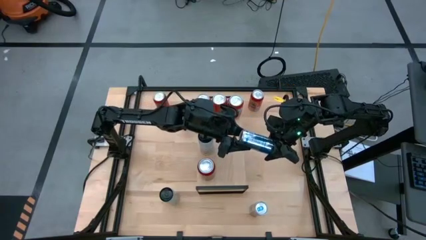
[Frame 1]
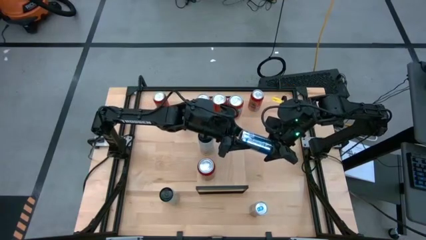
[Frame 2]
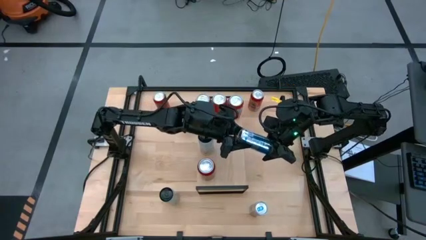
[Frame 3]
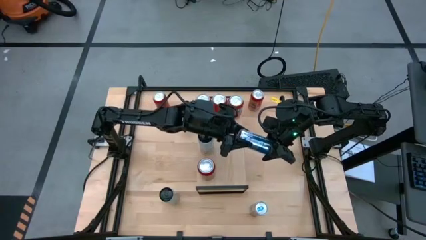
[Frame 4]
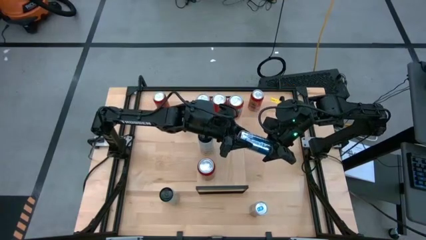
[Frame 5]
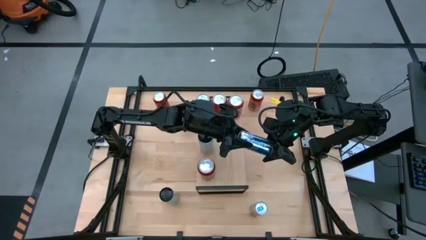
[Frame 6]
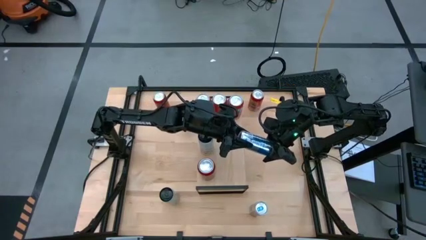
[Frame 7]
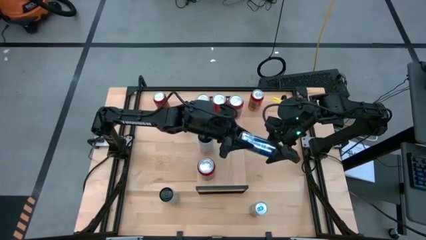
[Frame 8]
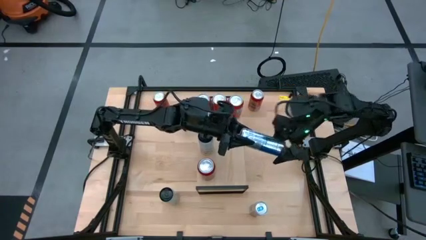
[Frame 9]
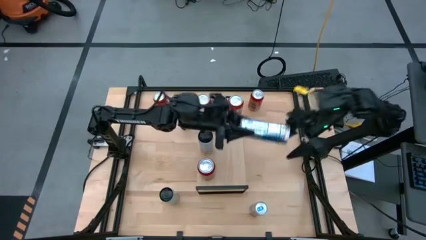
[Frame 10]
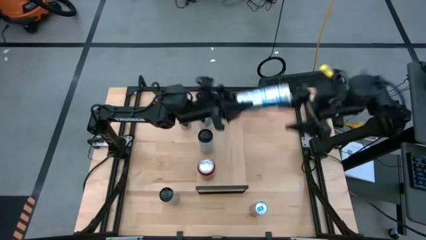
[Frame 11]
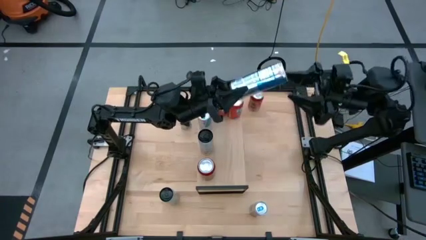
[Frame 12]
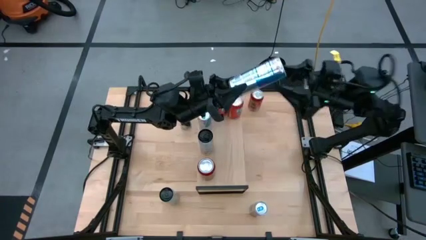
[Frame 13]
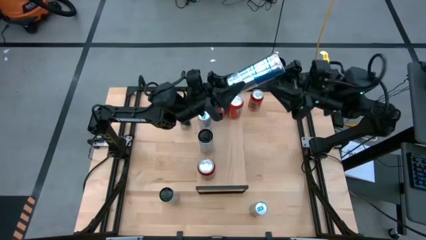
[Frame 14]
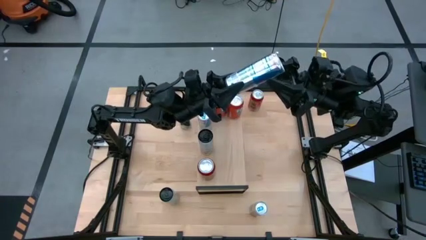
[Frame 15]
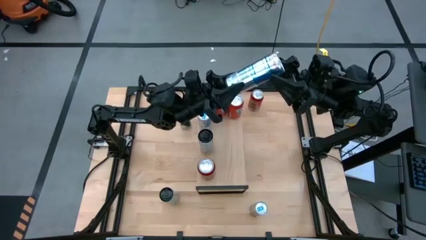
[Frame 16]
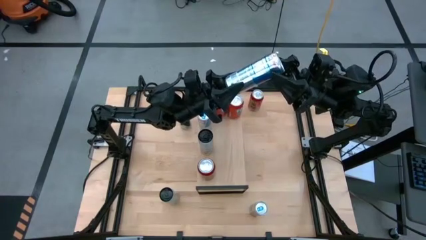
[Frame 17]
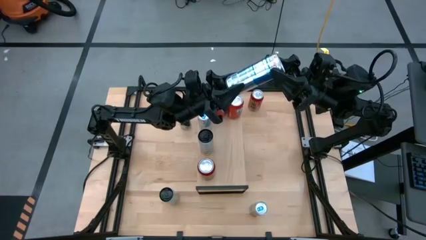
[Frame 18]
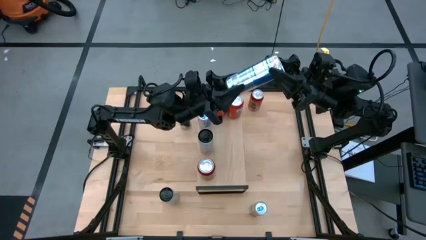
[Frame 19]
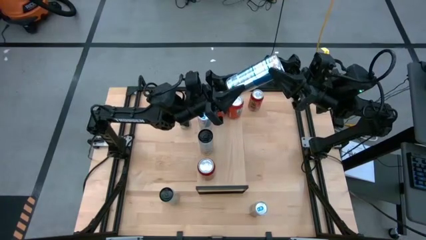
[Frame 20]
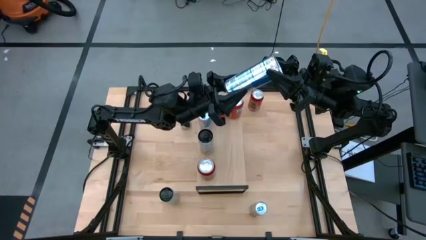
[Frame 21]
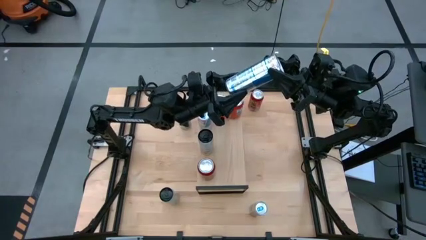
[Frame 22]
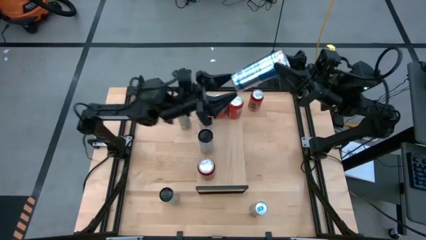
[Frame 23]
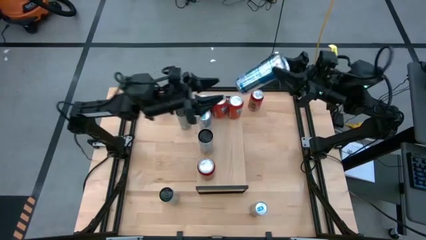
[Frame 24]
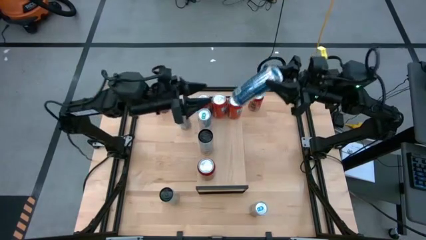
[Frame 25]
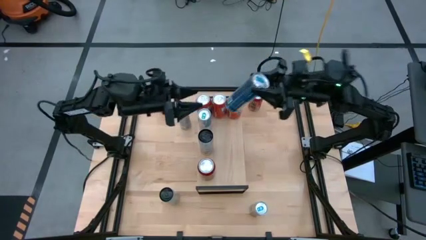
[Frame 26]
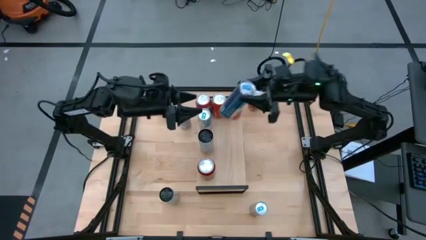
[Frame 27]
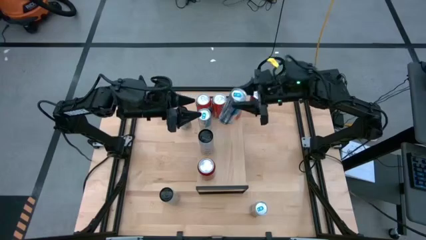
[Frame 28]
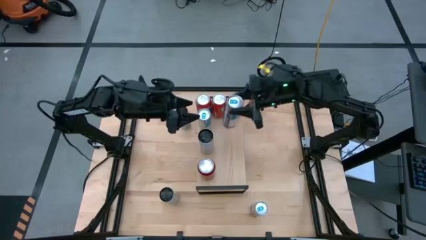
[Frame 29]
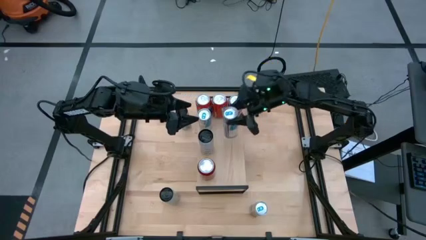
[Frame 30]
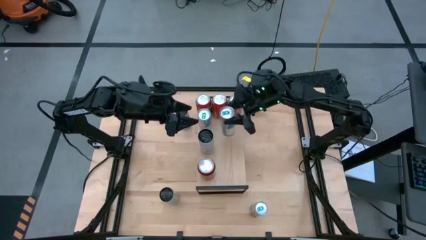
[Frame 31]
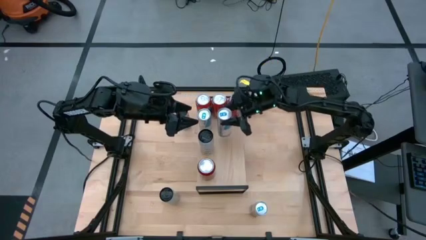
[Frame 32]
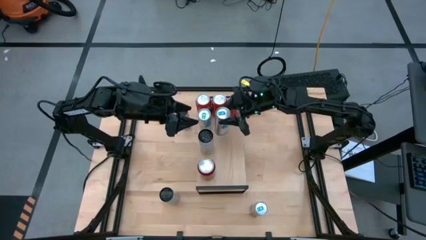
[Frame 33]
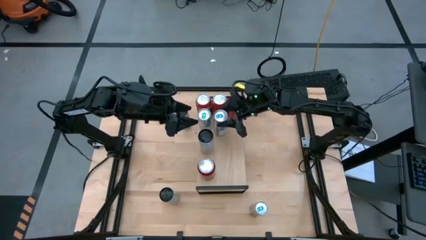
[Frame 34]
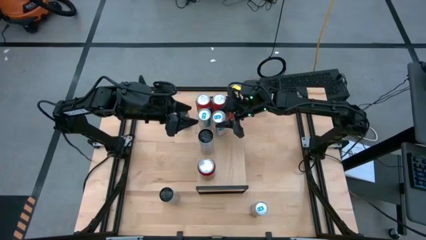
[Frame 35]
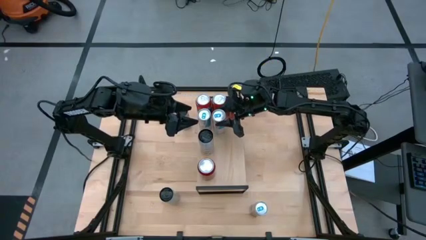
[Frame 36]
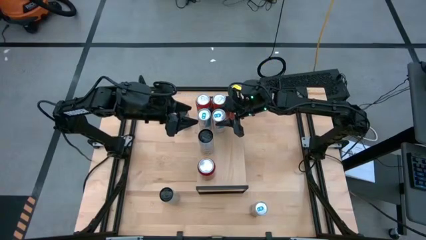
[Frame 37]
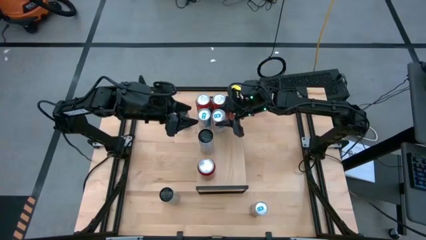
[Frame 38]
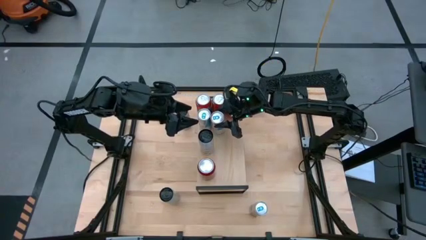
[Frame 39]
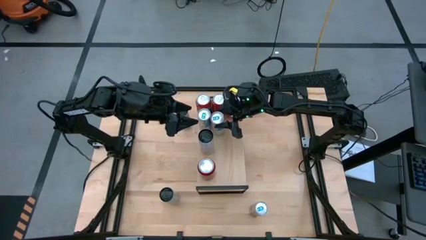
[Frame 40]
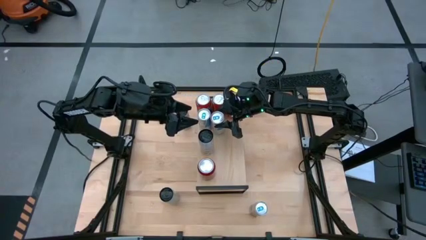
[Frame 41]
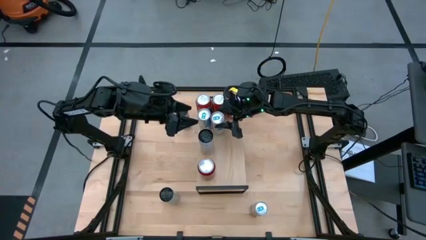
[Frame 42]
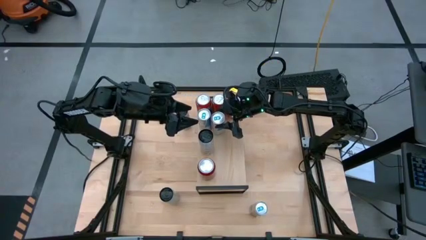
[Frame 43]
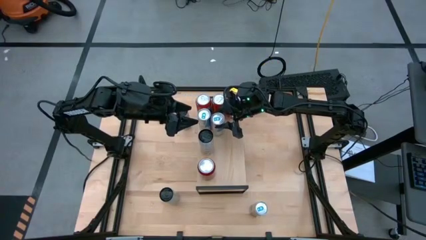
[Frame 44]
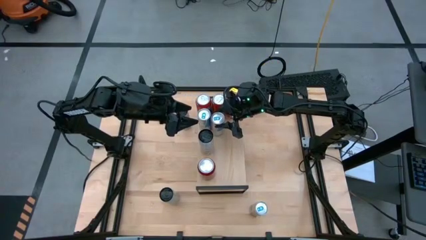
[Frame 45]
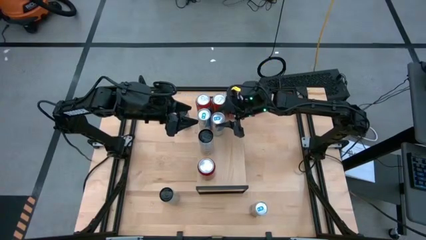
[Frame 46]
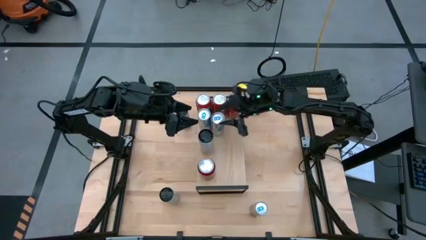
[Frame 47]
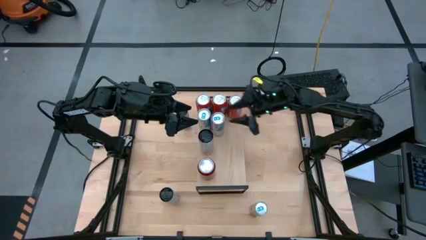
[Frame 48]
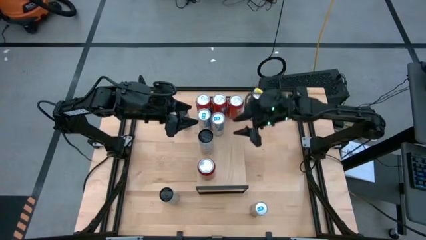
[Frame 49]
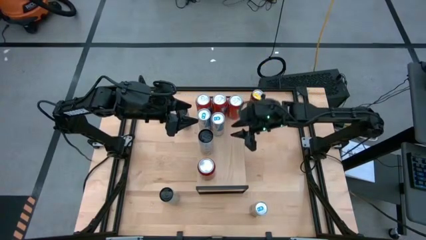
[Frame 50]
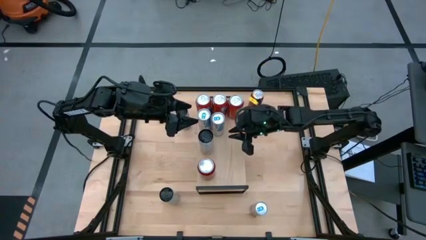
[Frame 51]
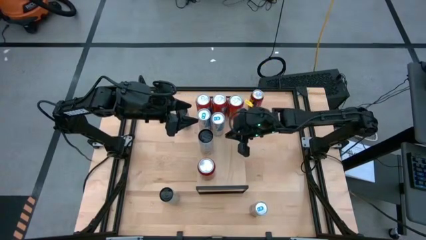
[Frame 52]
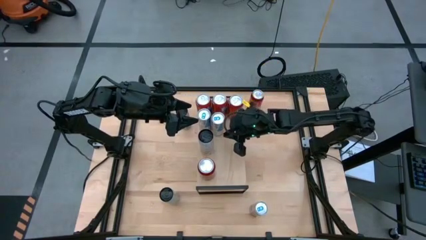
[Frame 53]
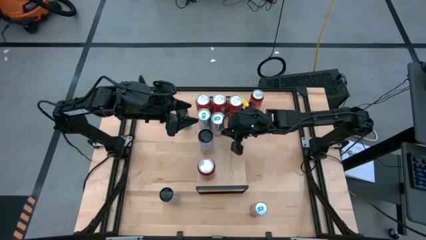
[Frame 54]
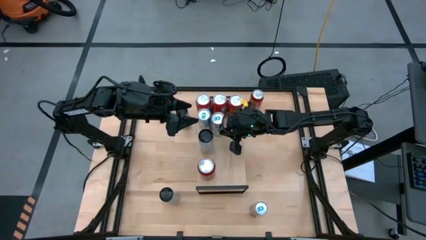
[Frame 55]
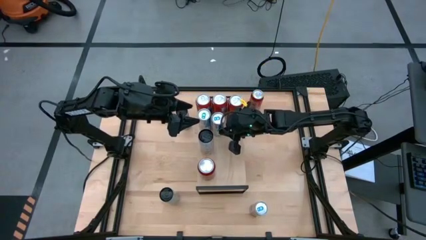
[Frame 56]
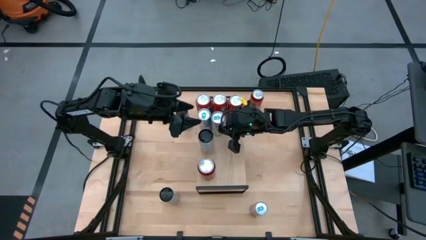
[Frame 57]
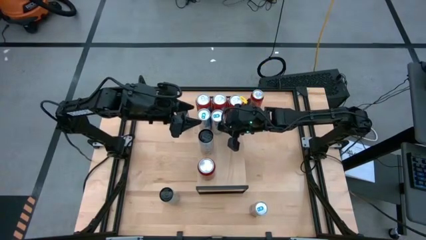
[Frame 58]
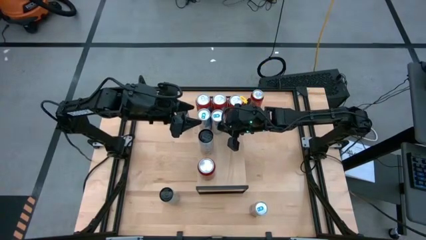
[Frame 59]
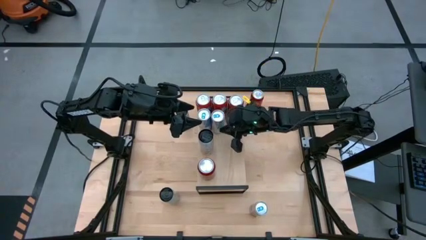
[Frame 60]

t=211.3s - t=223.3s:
Task: Place canned beverage on shelf
Put the top blue soda can on the shelf aligned with the other blue soda can
